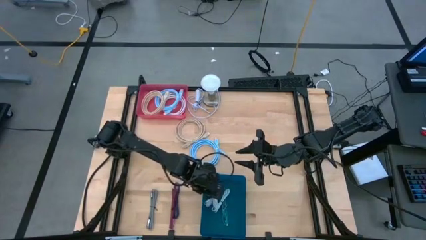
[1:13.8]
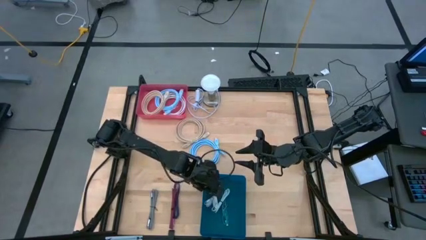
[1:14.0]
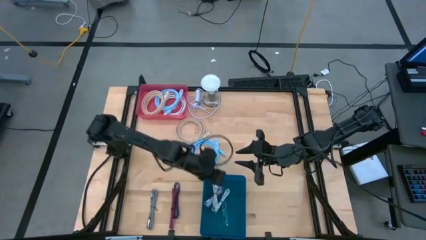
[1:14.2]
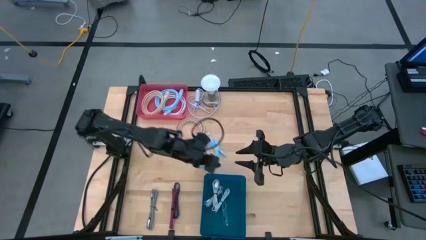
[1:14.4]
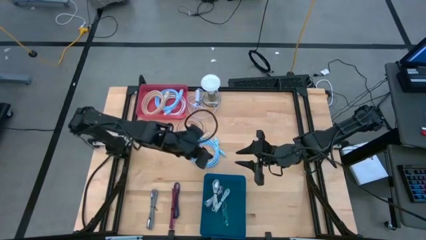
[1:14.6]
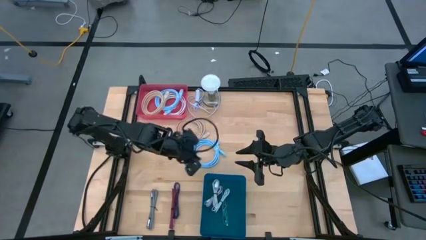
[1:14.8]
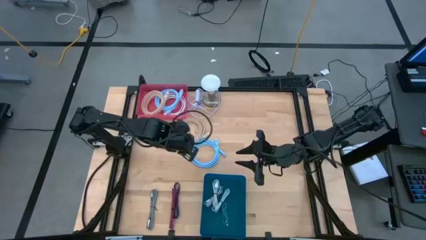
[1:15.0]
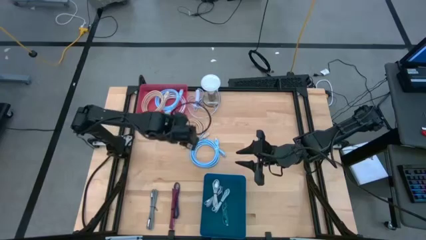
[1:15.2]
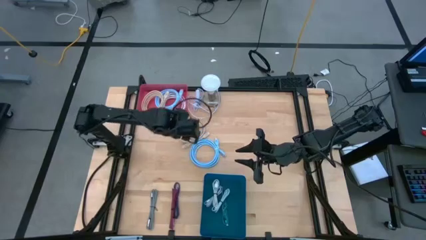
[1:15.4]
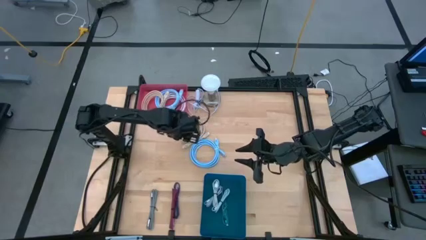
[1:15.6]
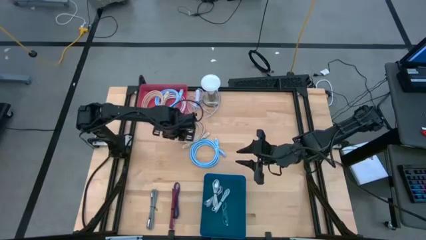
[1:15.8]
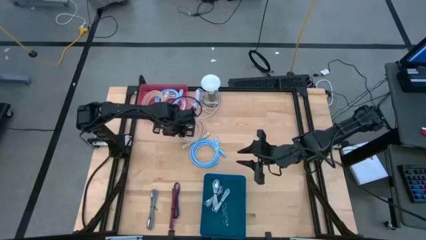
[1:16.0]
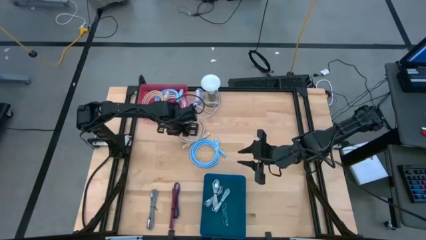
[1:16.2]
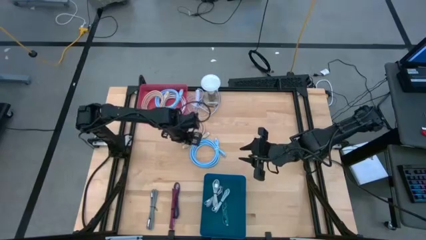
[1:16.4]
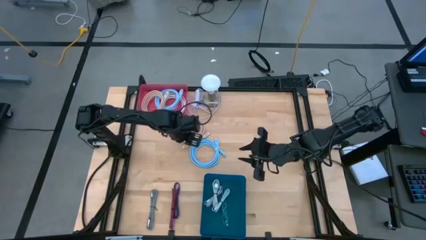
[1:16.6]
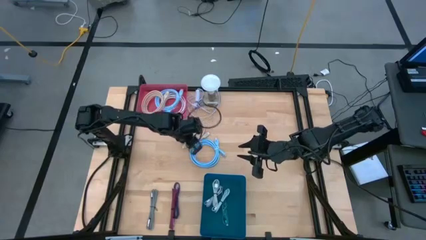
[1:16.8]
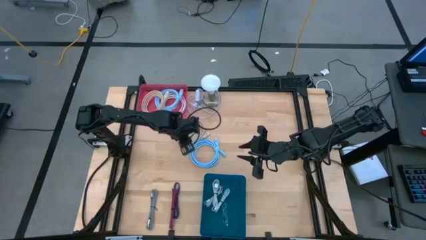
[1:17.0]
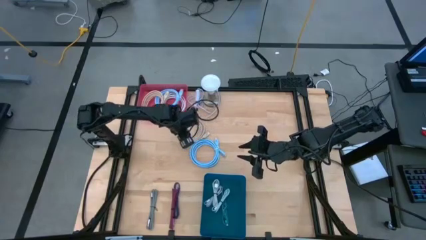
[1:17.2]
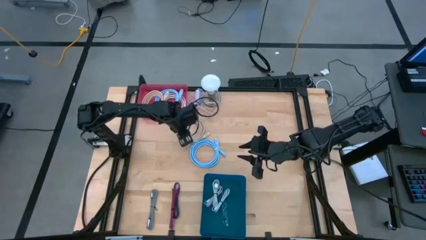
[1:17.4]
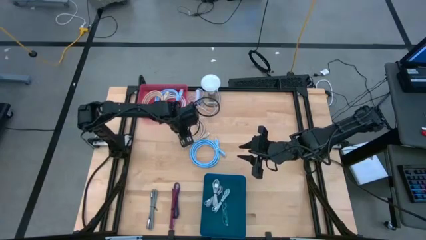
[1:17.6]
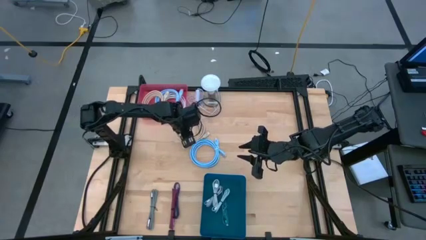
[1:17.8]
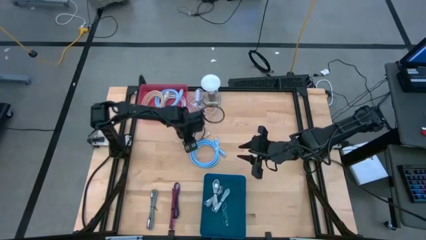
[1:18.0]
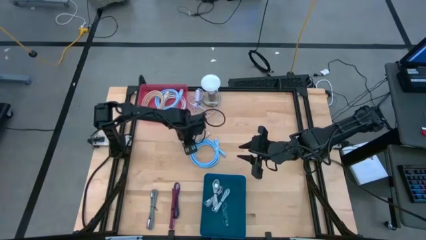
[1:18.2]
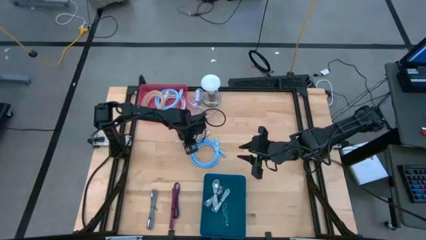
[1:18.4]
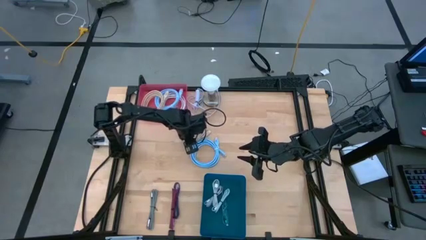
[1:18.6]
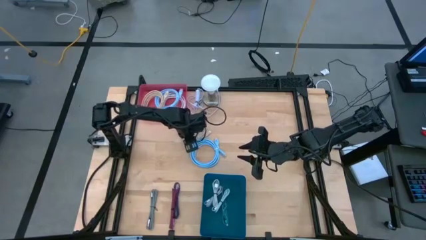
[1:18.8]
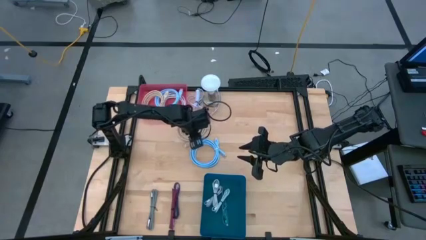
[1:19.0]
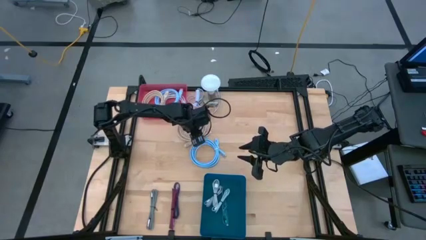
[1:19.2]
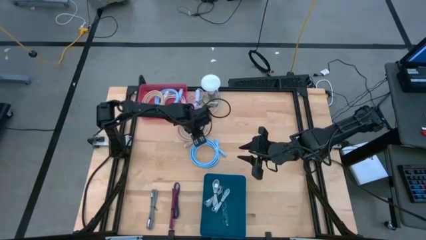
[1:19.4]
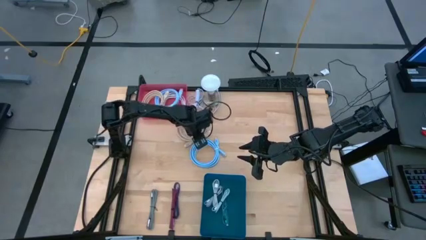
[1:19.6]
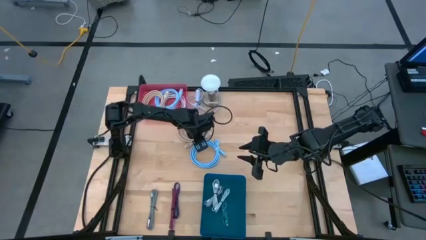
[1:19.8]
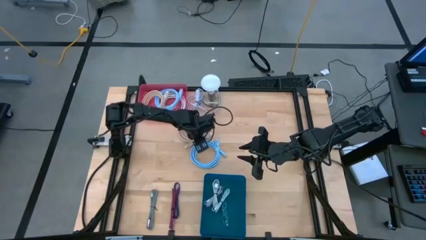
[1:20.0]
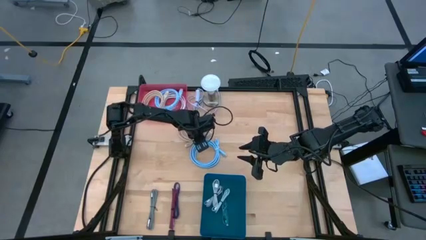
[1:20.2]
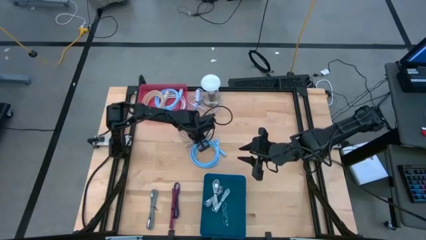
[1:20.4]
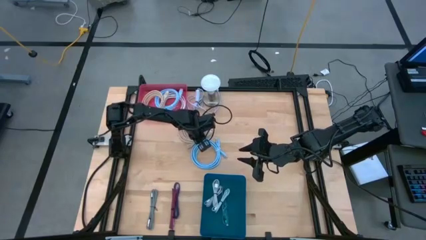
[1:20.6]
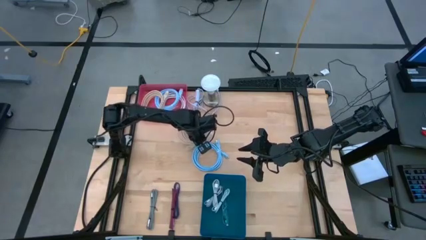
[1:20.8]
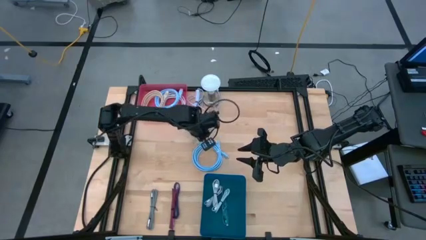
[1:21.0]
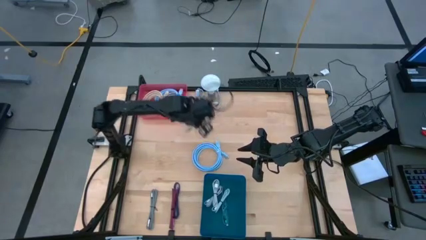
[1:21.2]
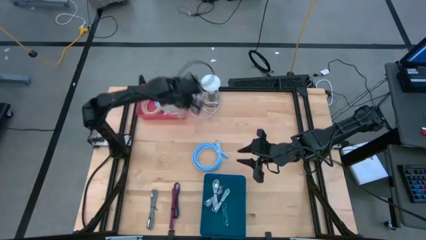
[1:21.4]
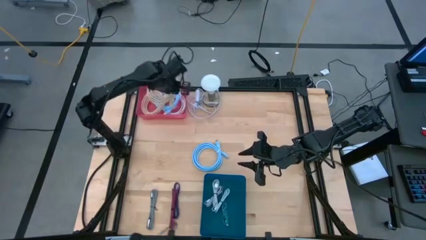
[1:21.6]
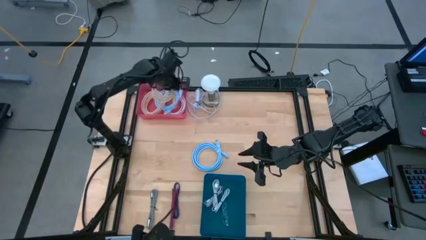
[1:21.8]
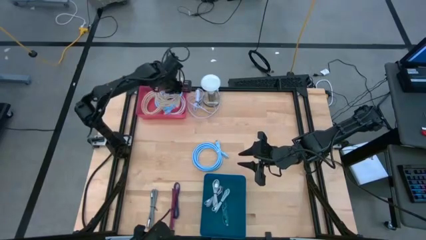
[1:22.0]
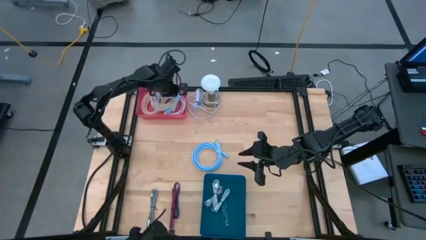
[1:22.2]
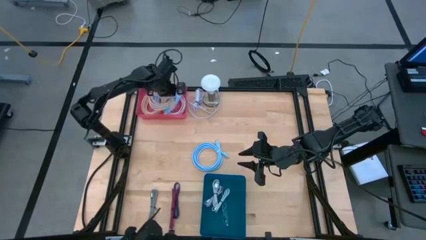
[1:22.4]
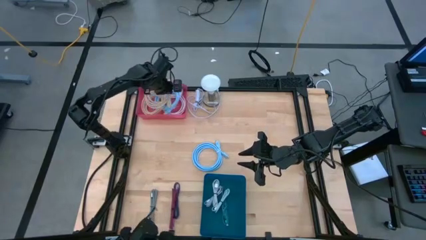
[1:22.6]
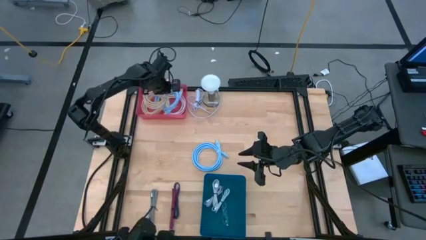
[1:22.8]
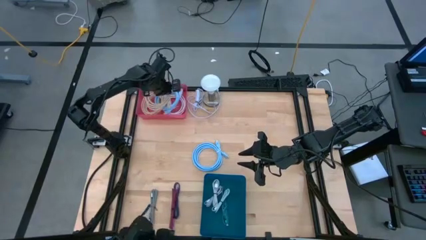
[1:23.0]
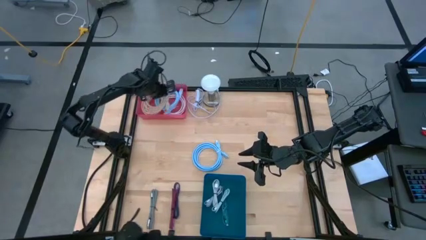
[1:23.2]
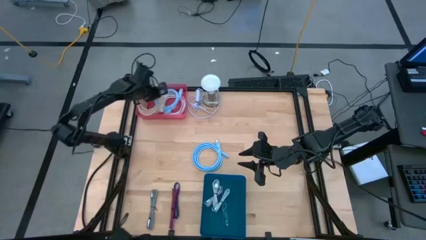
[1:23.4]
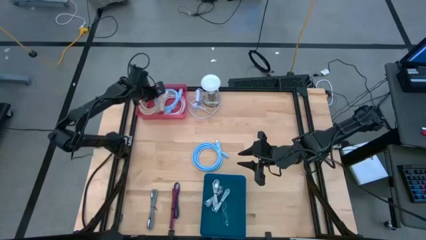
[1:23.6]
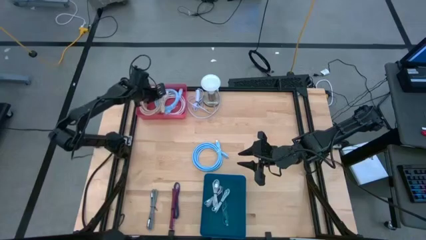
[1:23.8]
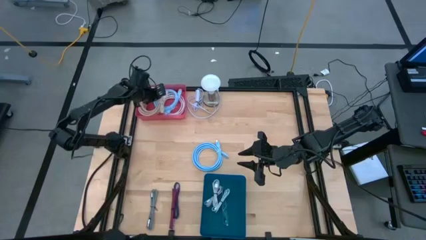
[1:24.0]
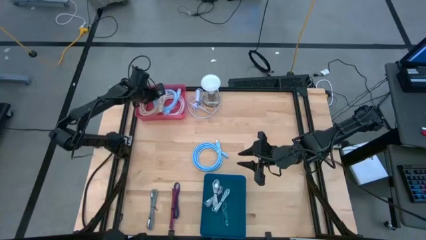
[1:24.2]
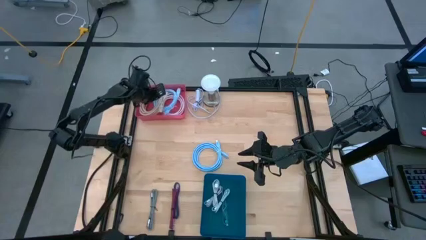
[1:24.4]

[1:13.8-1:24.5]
Task: Pick & Place USB Port
Put the brown HDMI cable into the red bin
